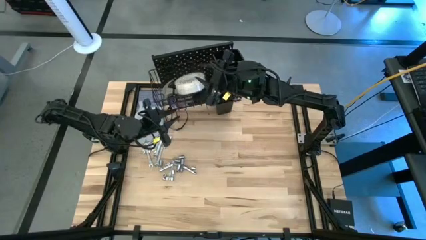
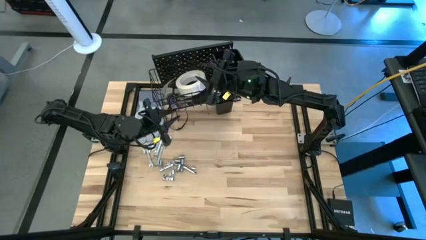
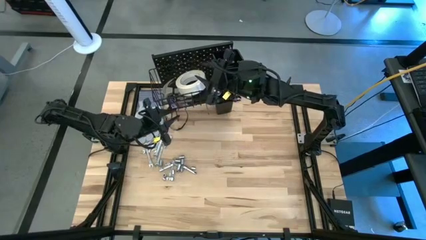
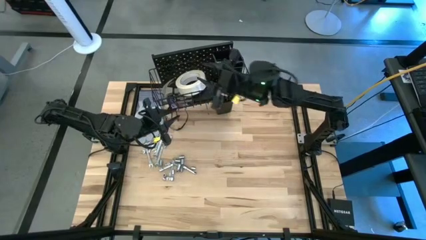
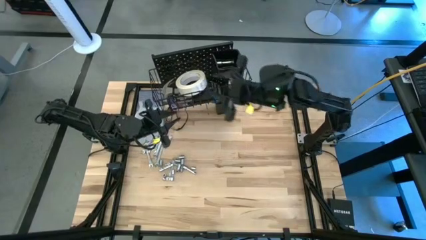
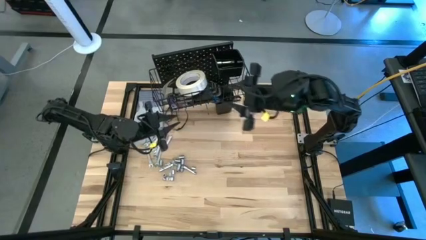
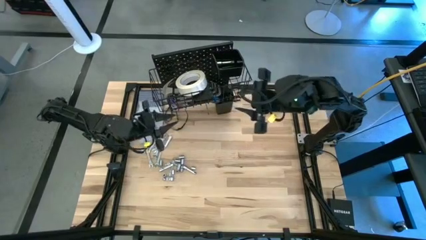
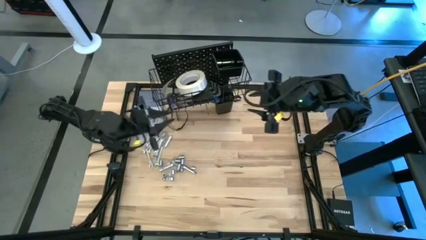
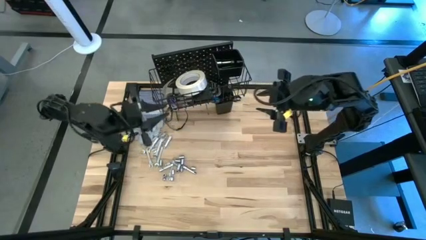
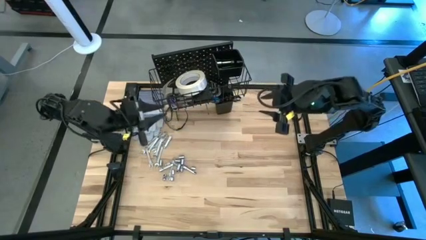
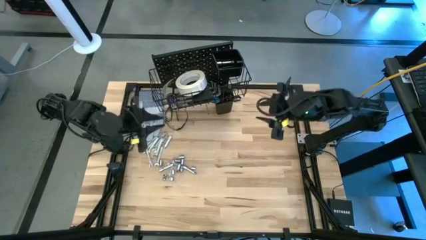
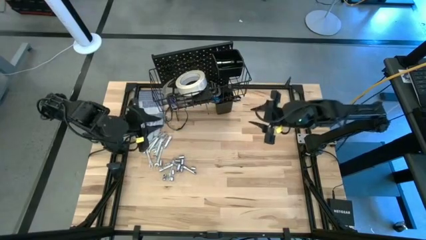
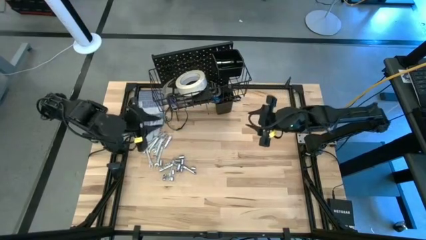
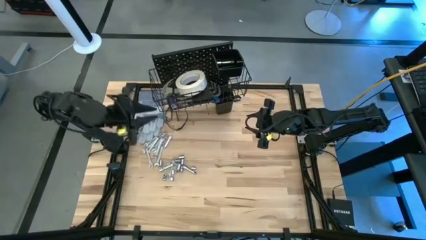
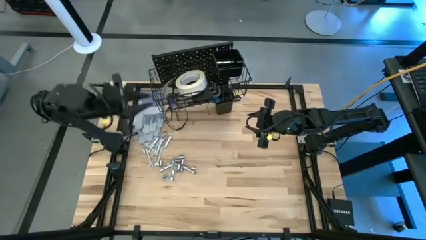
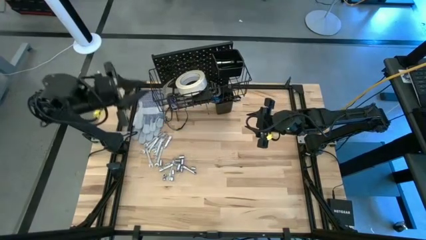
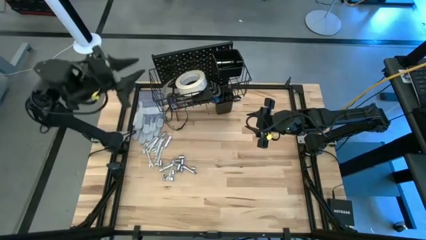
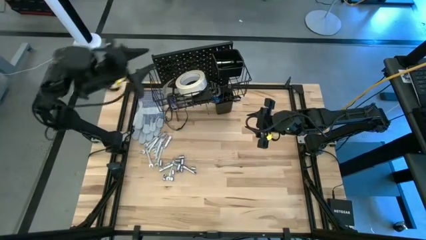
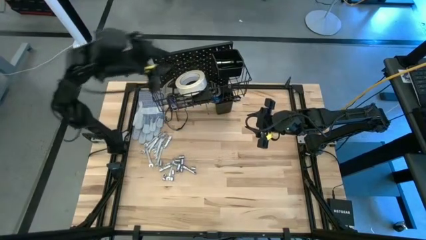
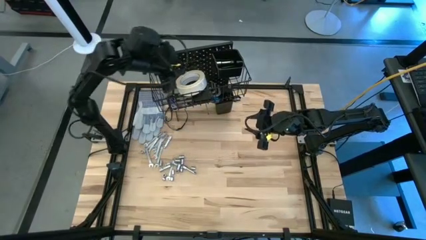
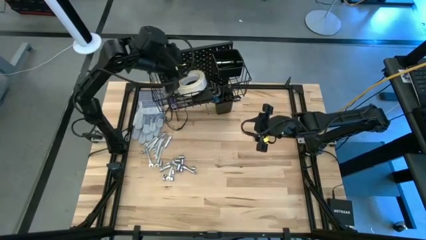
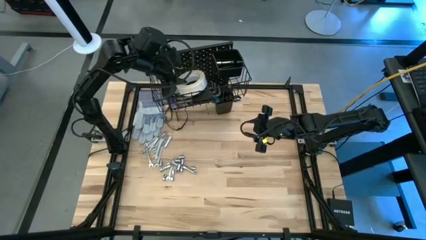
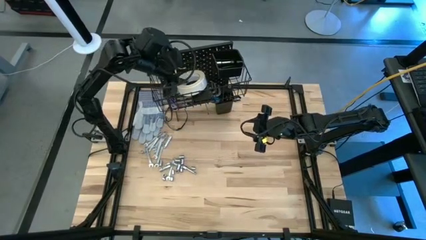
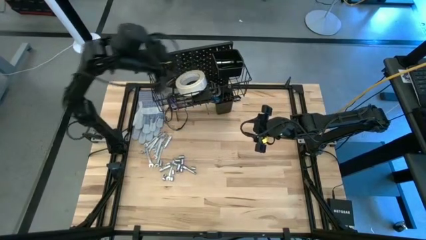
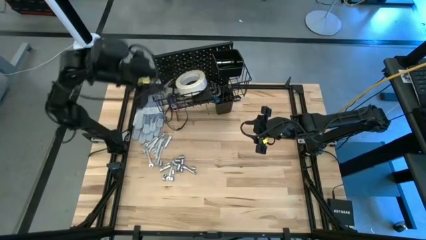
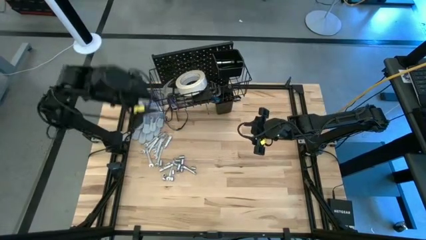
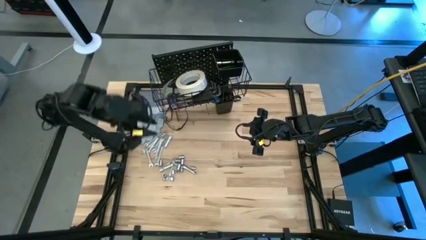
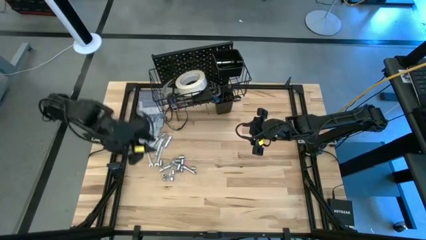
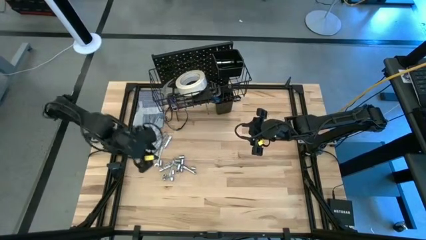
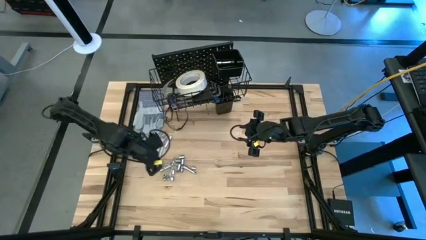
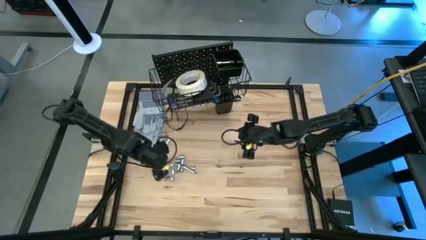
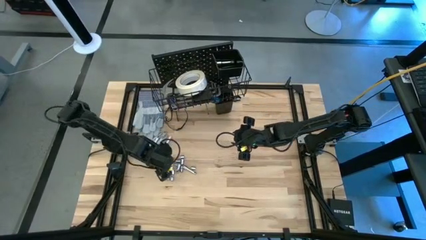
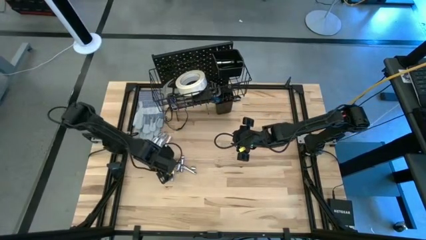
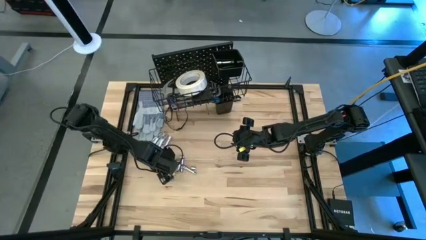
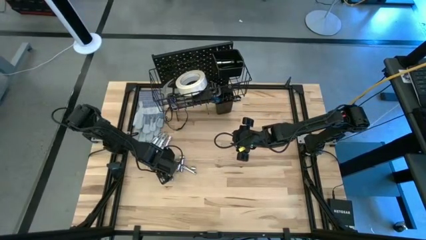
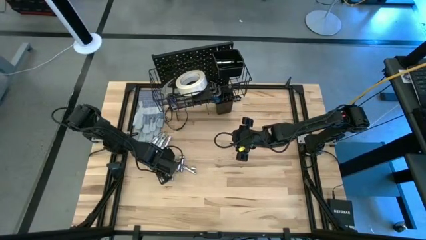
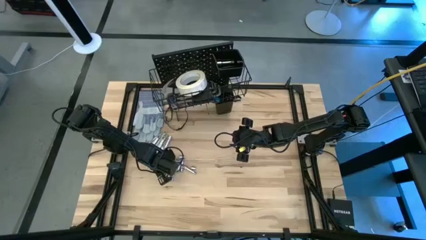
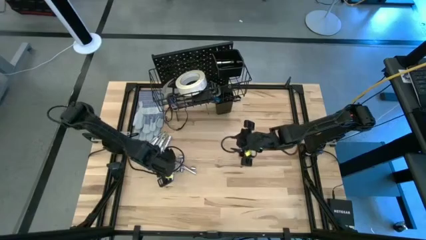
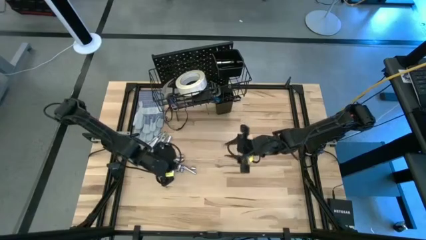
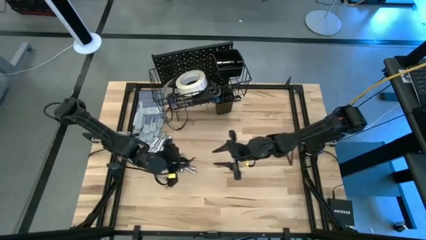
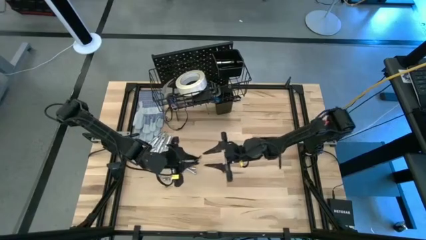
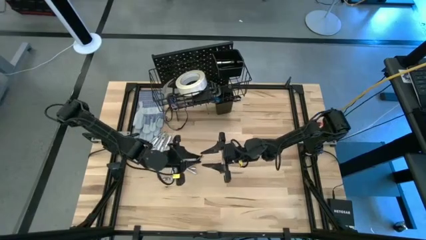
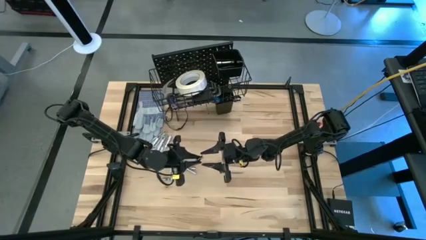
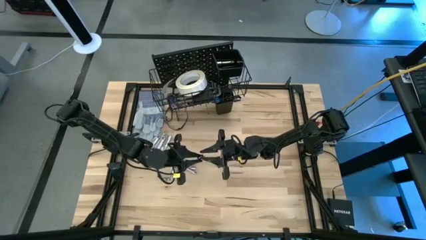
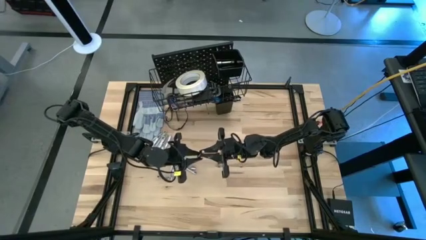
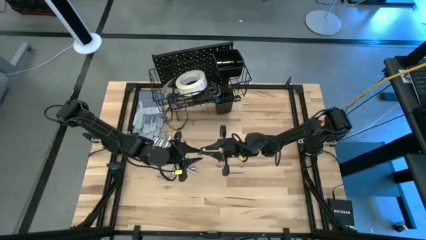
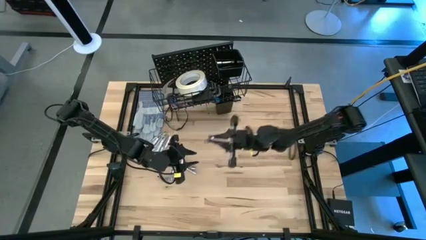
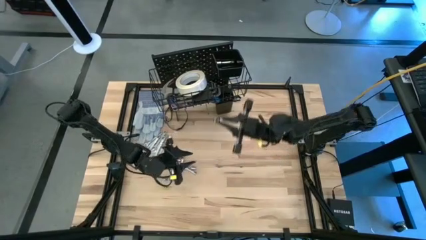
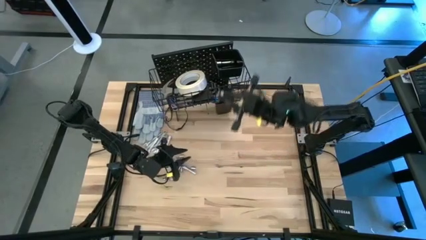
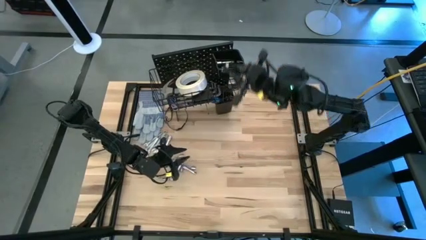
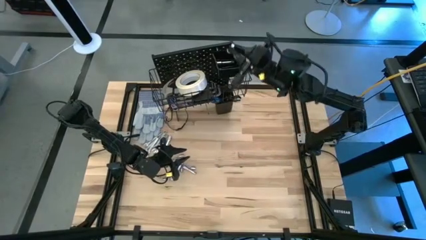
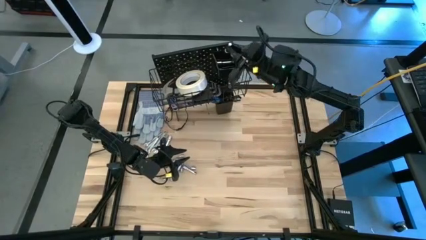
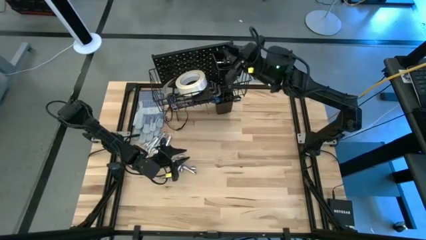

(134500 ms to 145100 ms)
Task: Hang tools onto peg board
Put the extension bar into the top black bin on the pegboard

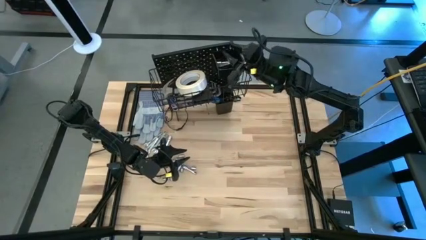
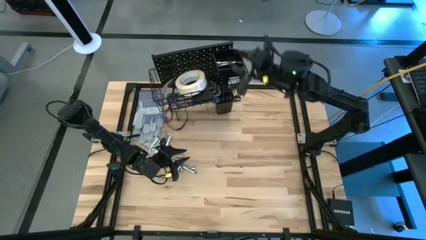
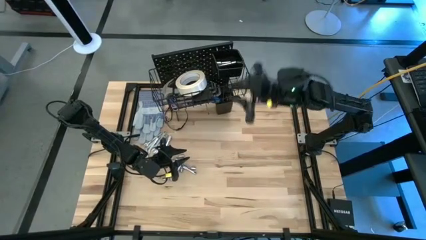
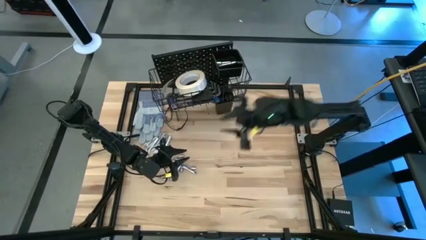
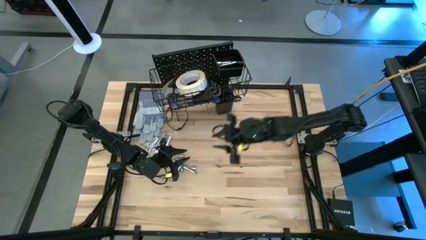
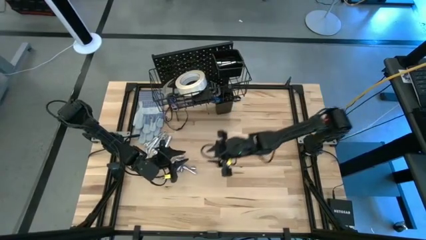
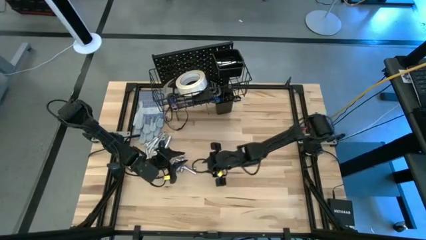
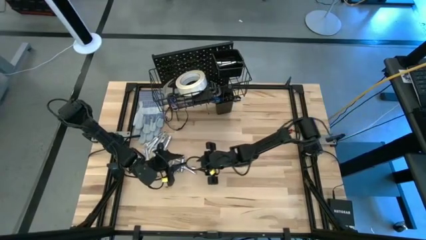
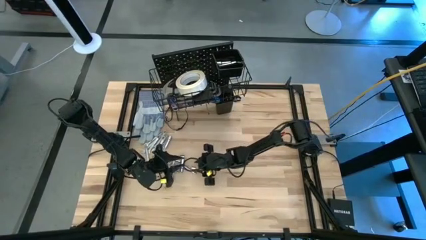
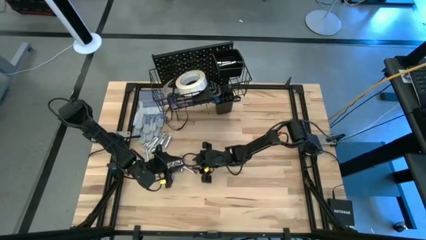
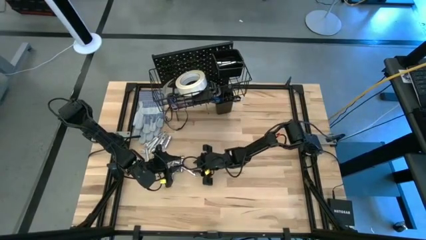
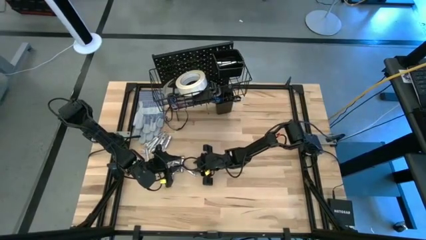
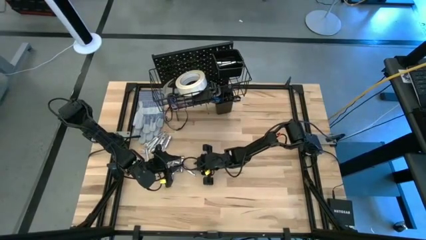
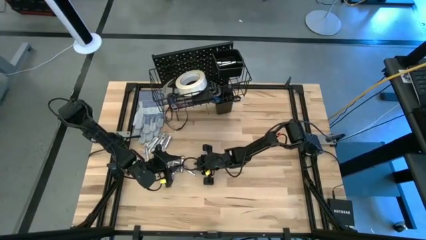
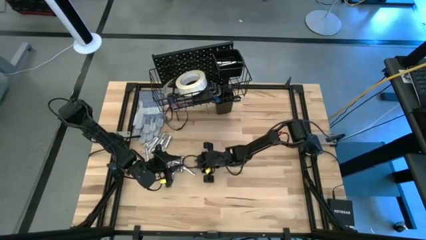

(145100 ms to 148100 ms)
Put the socket into the top black bin on the pegboard

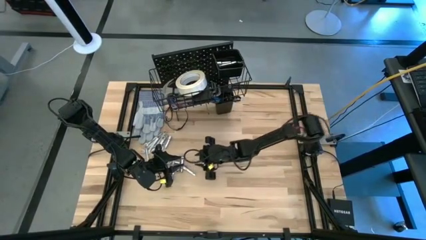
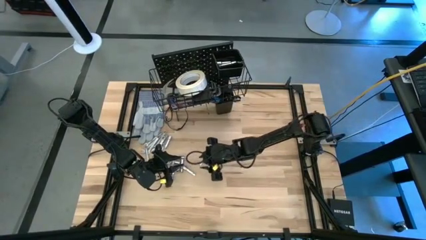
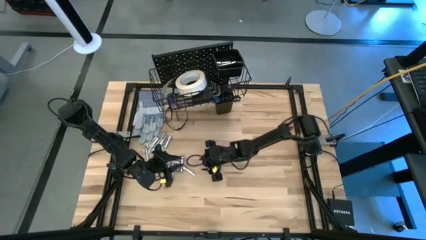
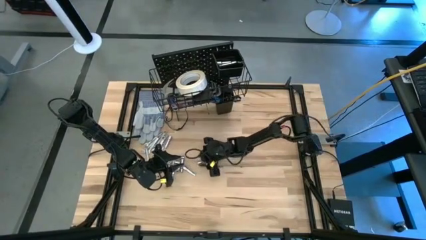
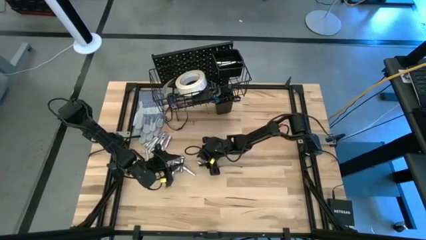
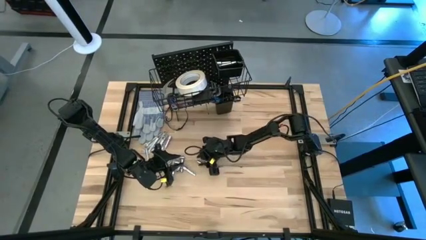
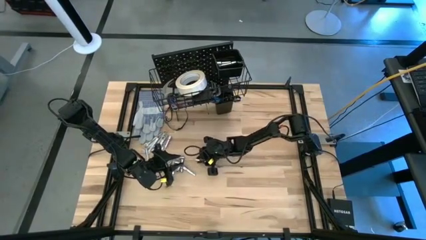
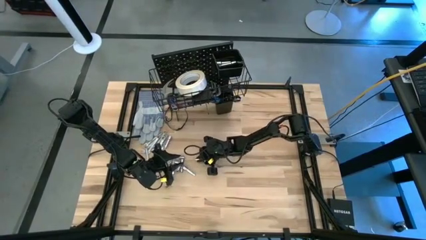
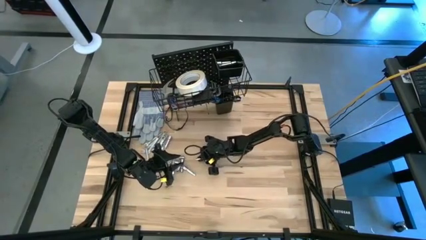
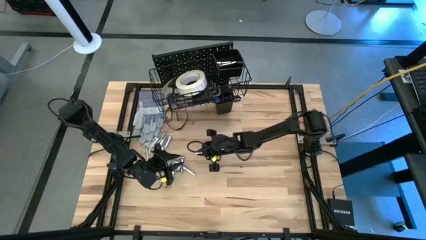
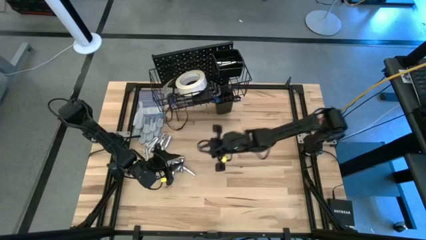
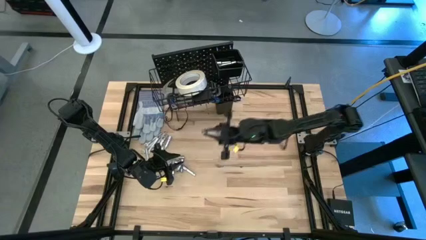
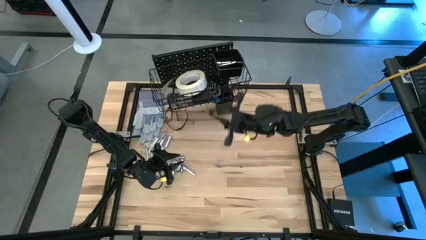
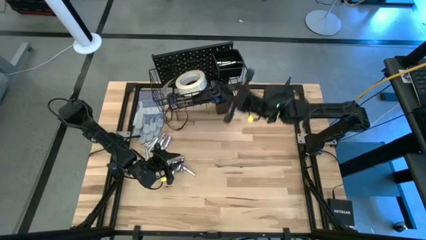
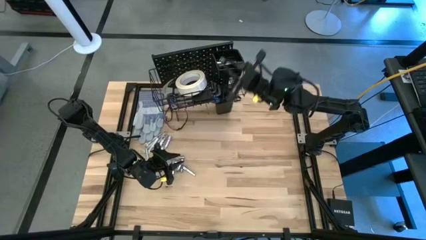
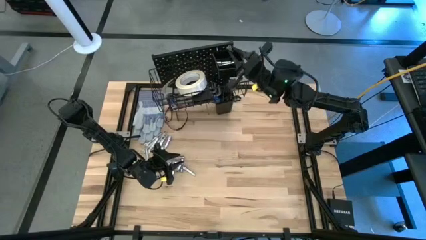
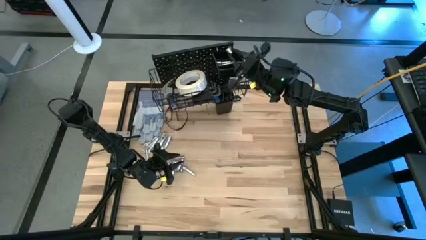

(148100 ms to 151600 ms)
Put the socket into the top black bin on the pegboard
